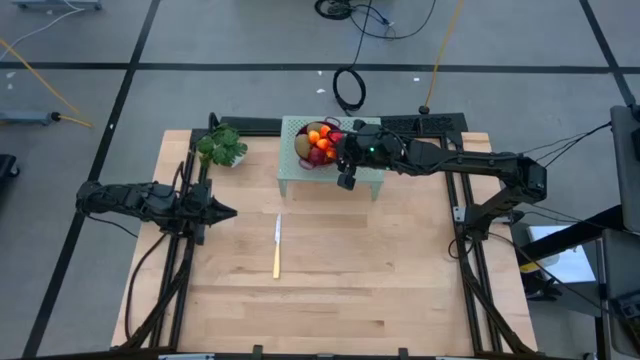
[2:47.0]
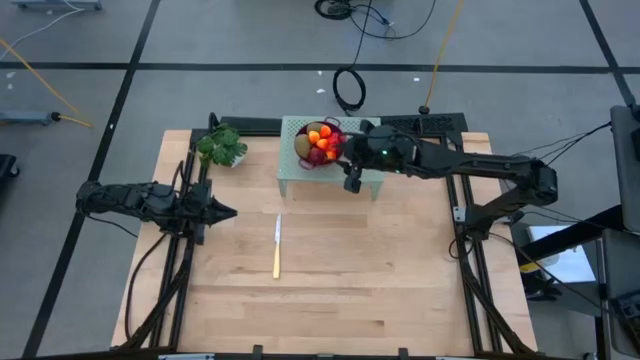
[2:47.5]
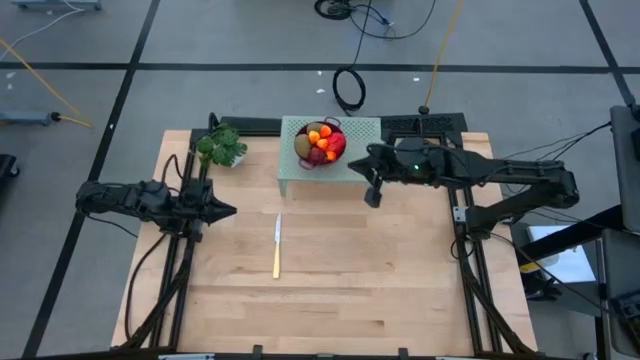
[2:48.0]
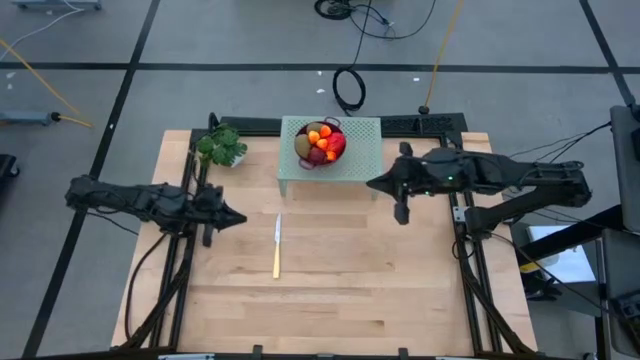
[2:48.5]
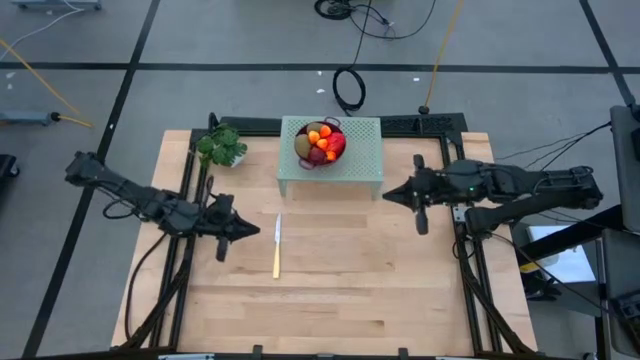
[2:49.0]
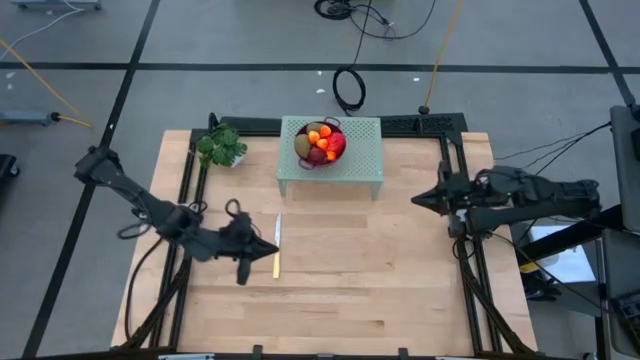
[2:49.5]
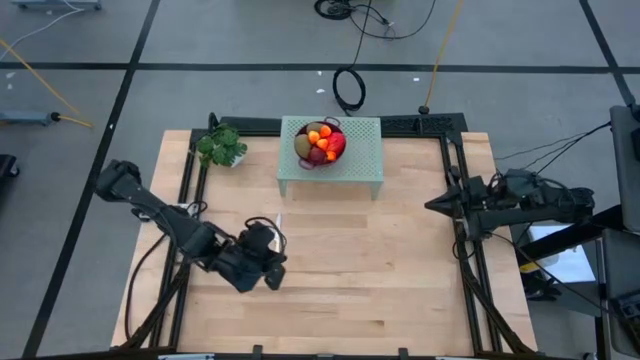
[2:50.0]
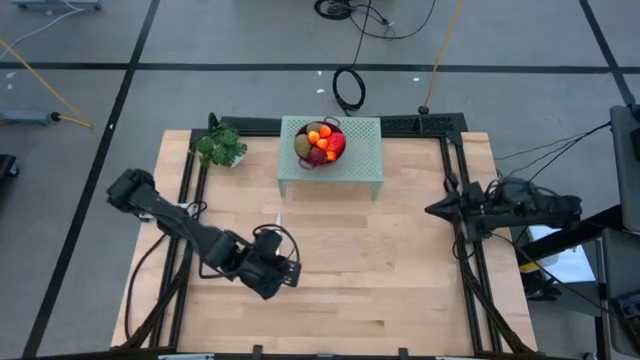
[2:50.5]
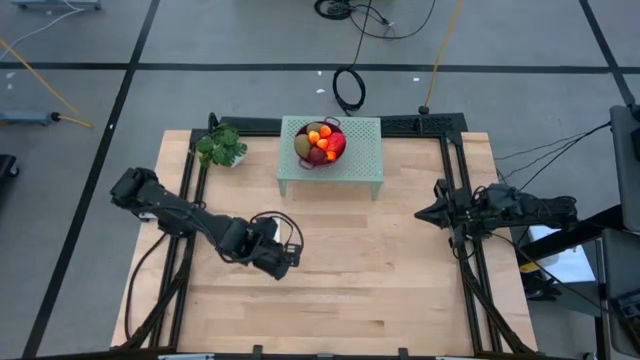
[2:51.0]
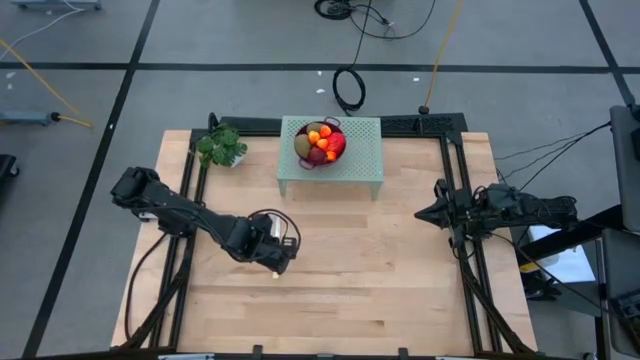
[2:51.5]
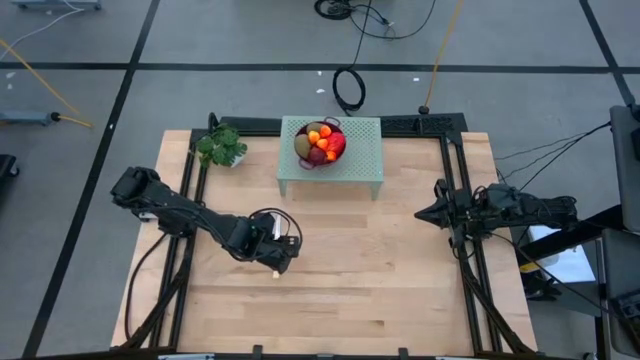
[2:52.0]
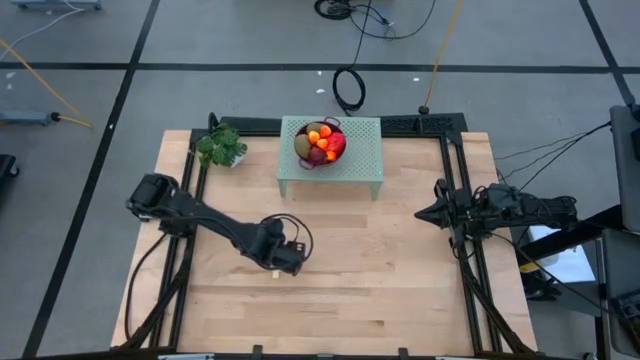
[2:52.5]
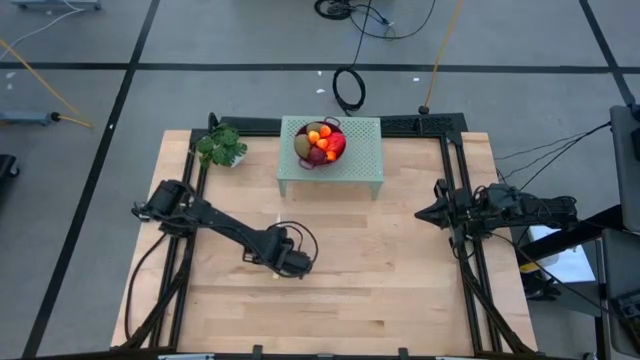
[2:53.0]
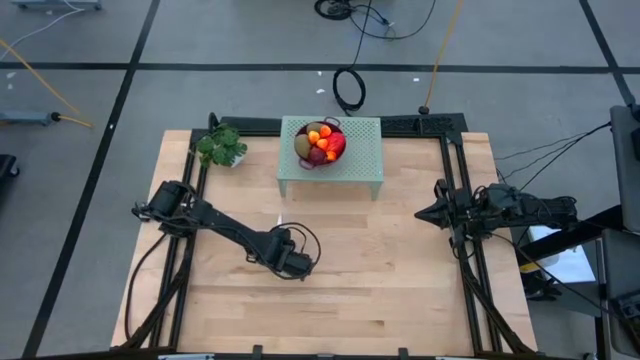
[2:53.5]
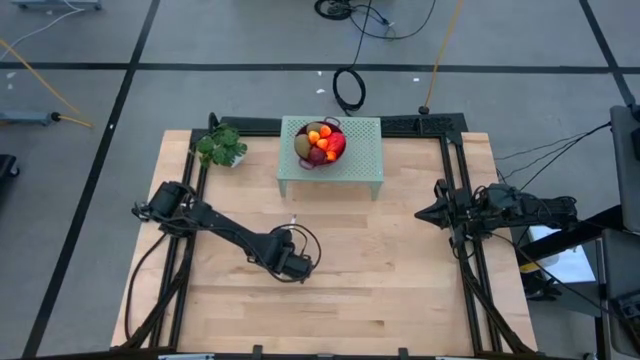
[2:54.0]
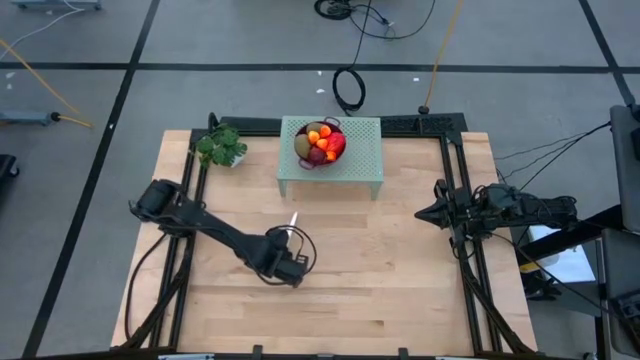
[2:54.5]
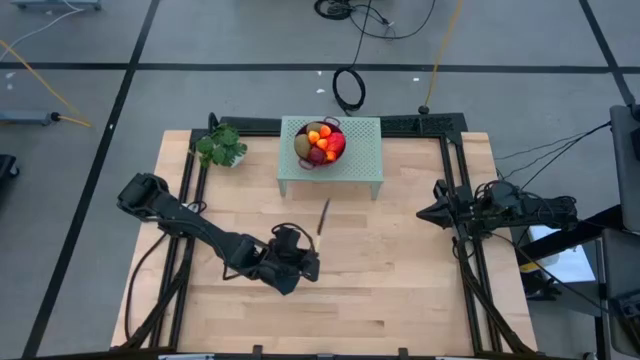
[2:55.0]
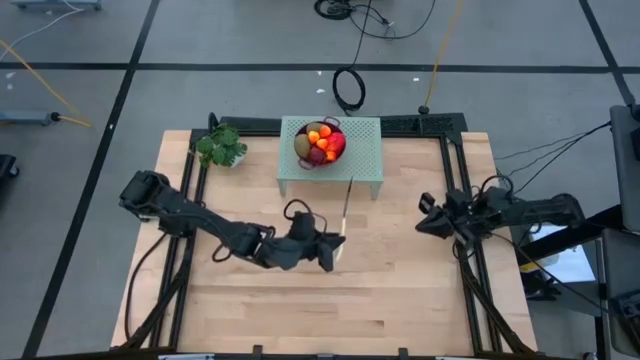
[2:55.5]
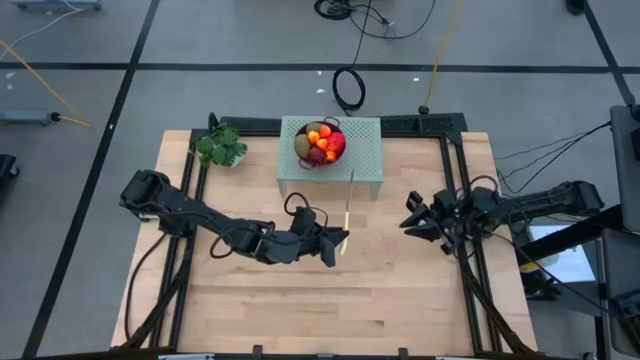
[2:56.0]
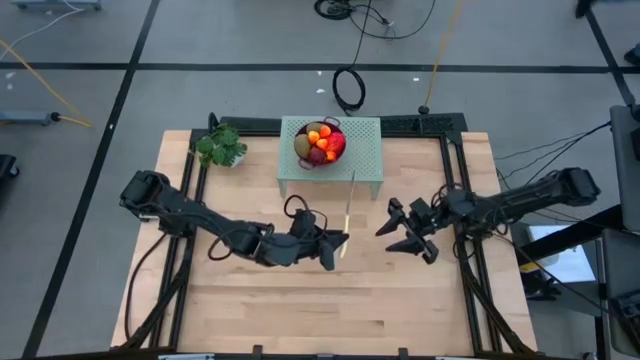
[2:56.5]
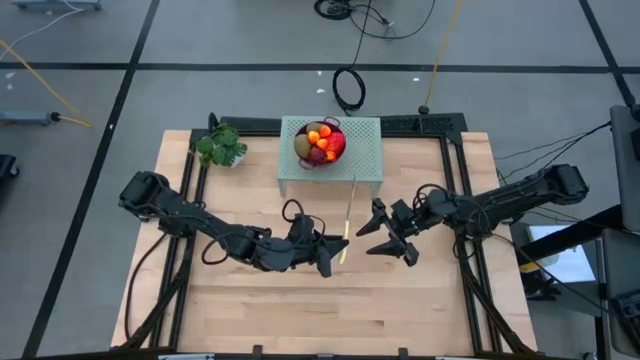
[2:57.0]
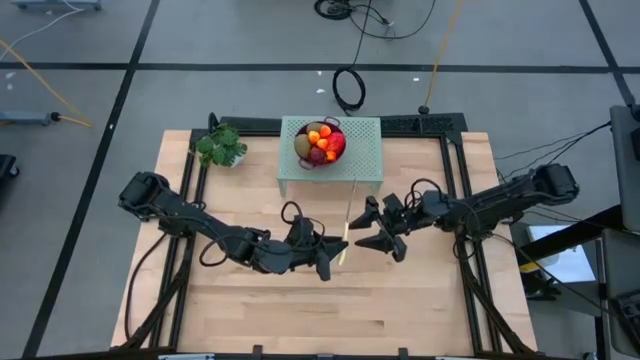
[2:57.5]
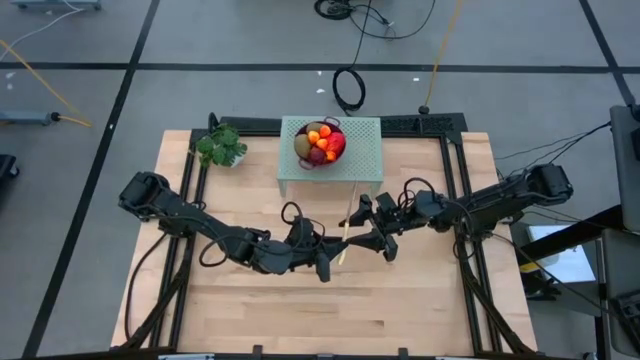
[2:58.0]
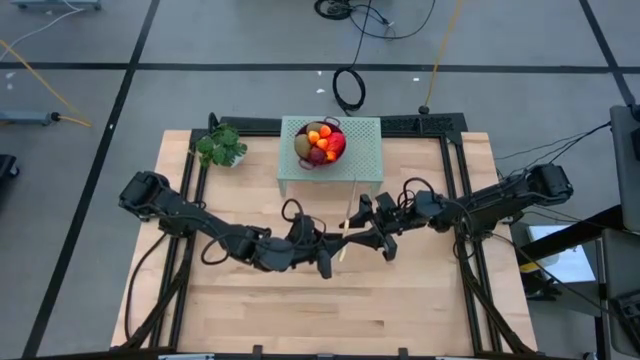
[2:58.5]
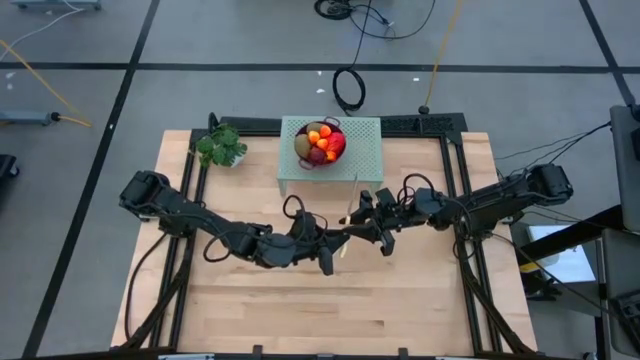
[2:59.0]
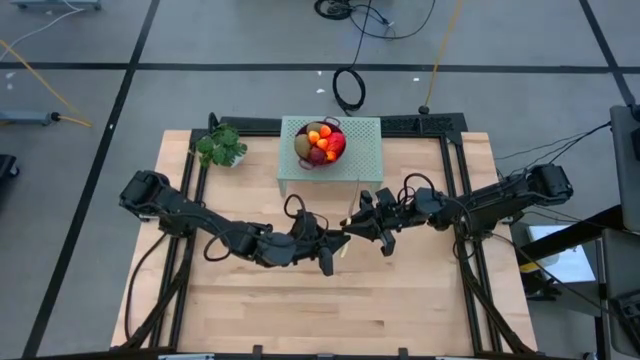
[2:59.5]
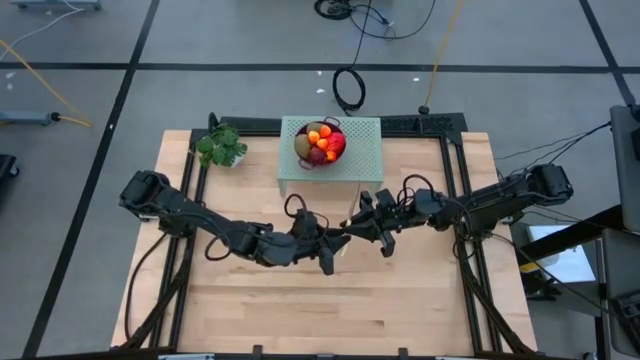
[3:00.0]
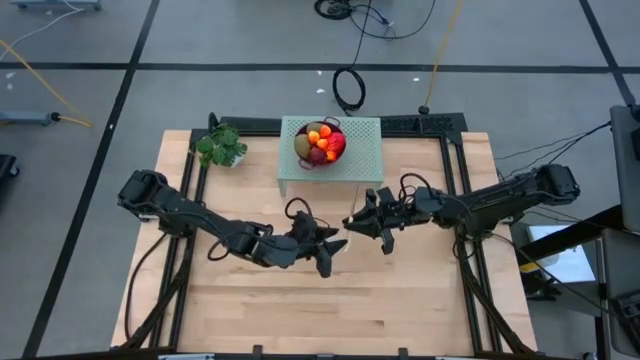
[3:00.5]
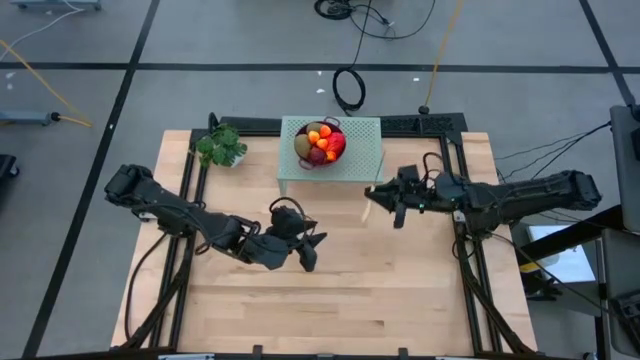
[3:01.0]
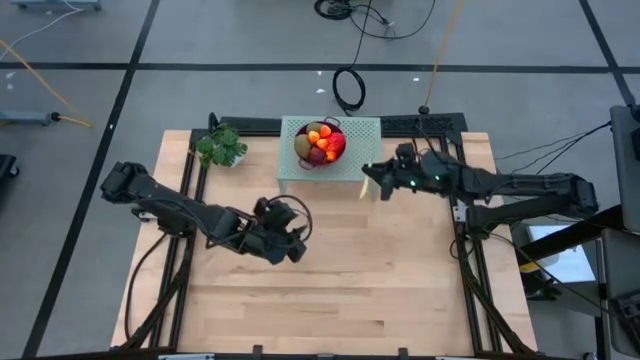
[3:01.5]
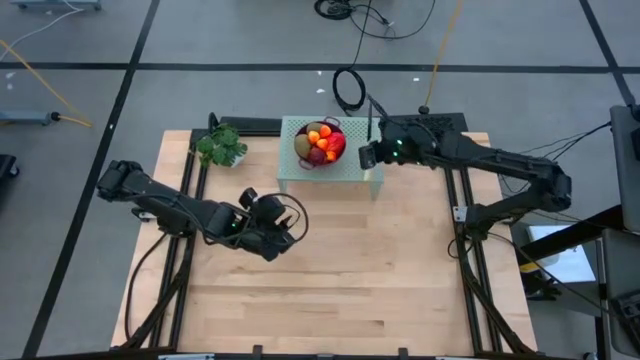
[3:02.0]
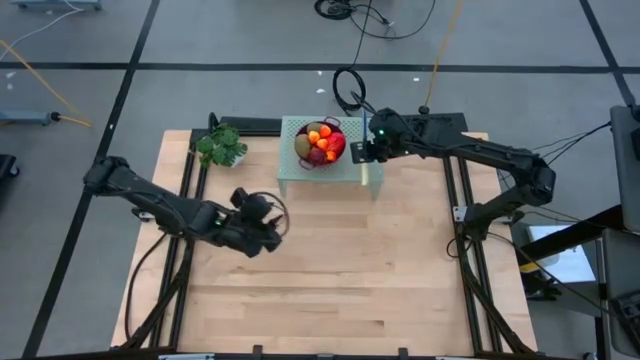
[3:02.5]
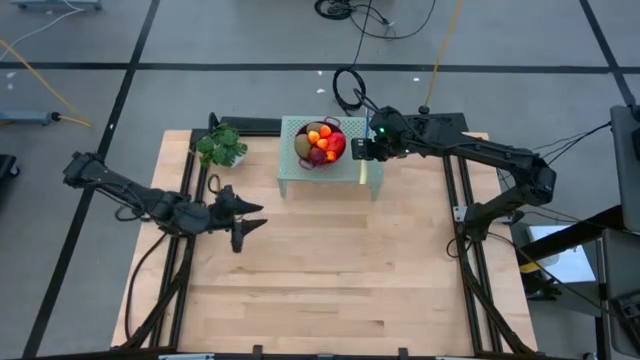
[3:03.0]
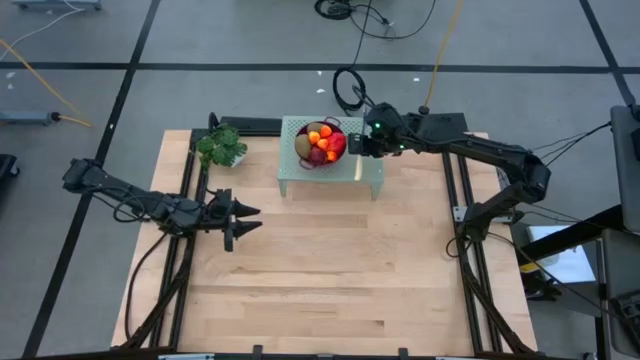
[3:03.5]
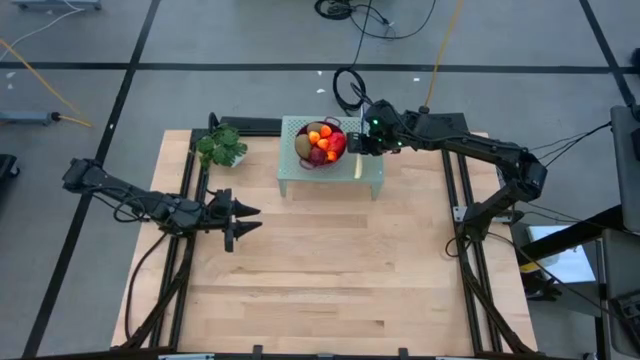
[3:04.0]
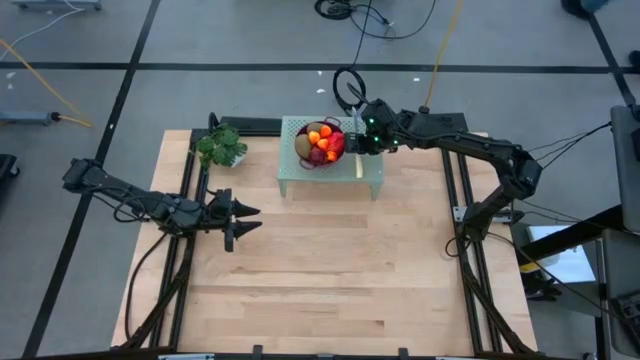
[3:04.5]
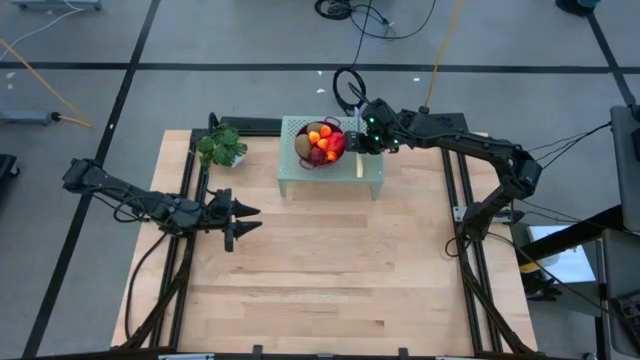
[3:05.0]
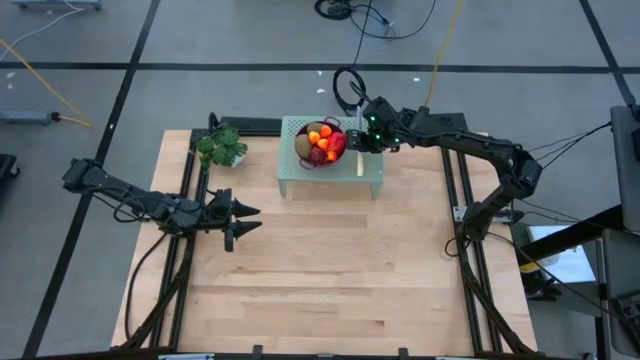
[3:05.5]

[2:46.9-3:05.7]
Task: Pick & Place Fruit
Put the yellow table knife on the shelf

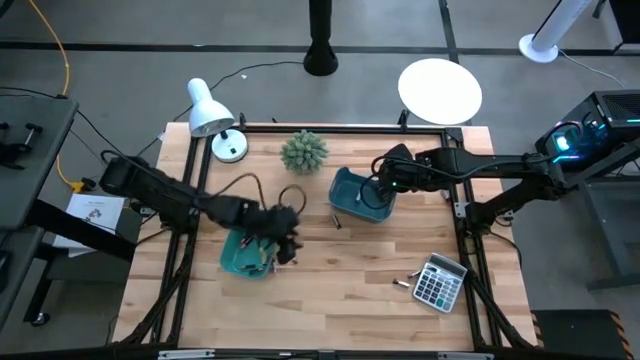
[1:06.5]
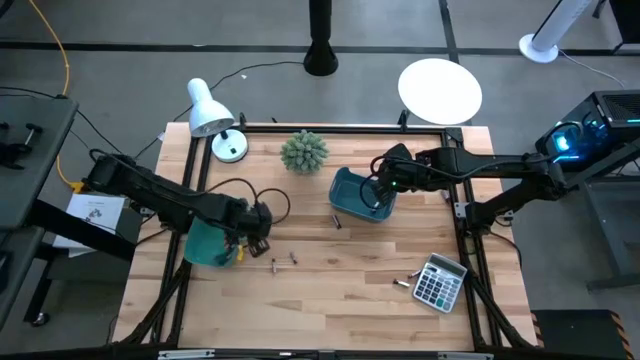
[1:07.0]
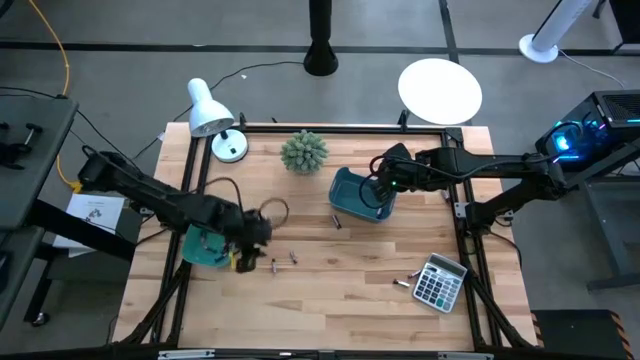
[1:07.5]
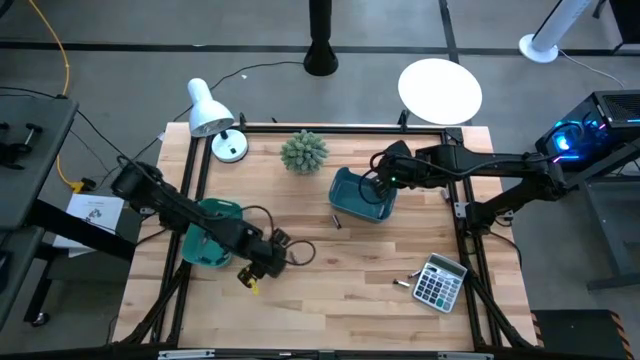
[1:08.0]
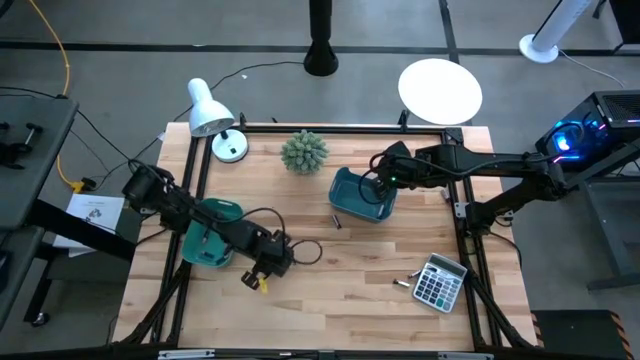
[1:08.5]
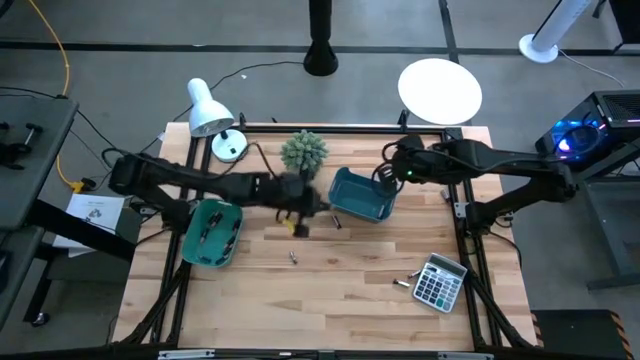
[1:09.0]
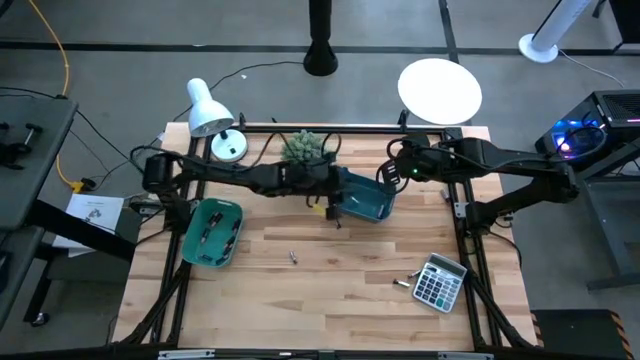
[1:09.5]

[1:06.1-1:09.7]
Task: Sort batteries
Put the silver battery into the blue bin

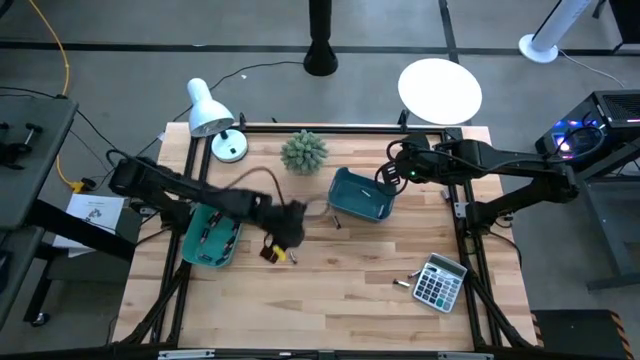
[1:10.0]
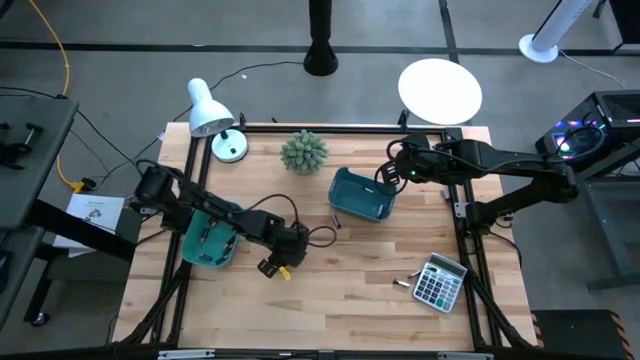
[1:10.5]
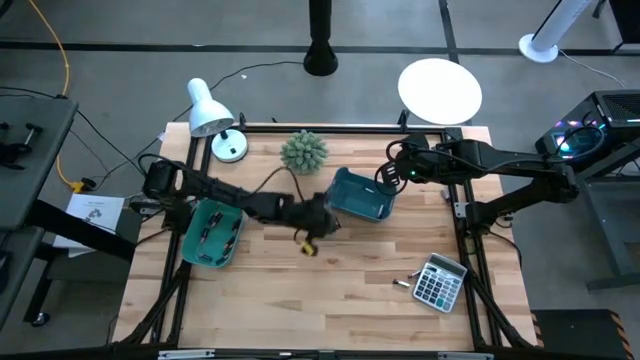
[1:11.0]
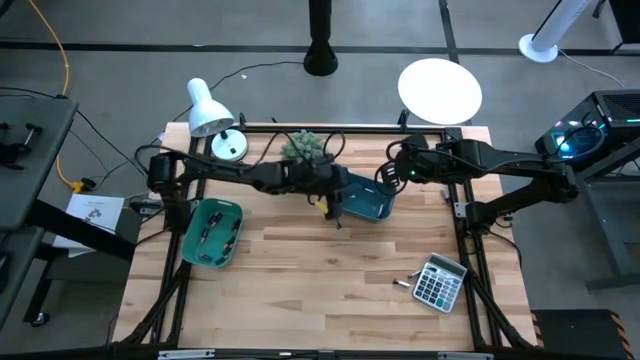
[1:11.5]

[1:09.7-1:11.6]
Put the silver battery into the blue bin
